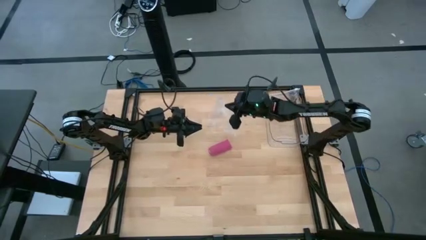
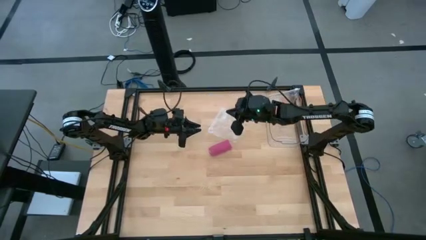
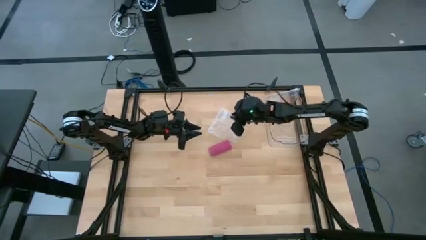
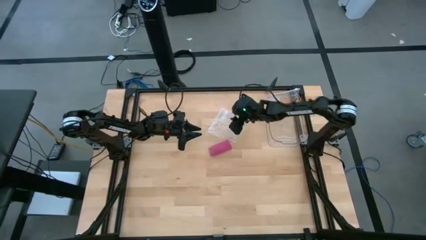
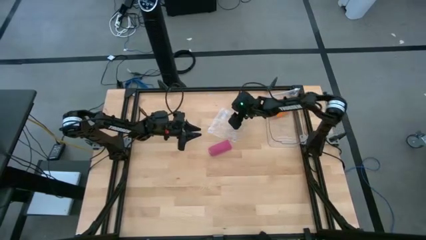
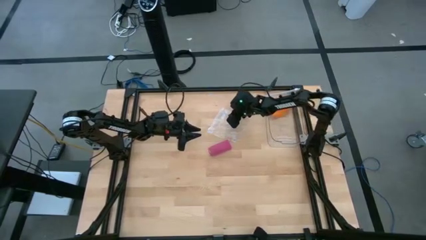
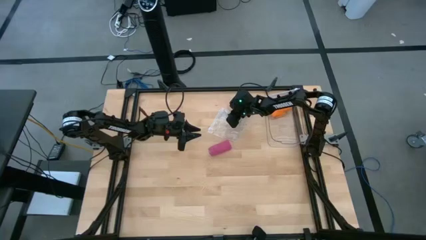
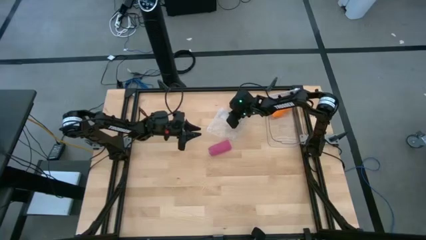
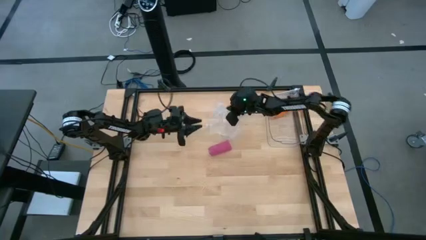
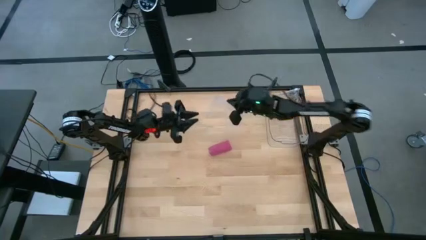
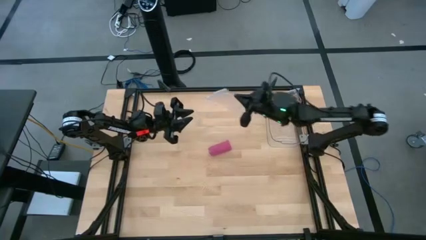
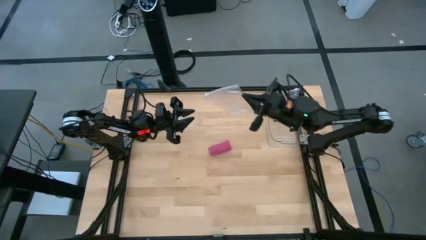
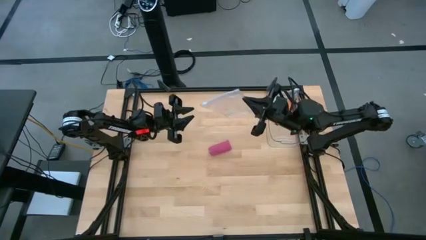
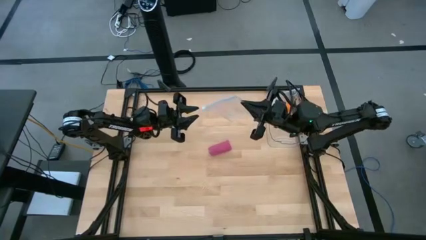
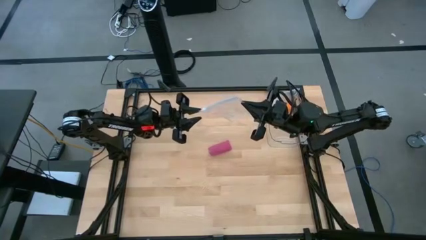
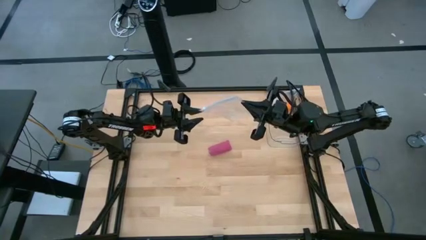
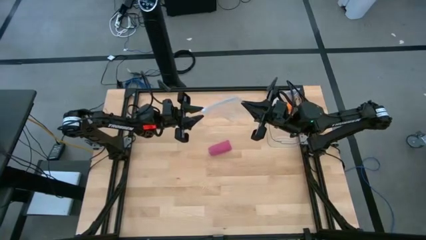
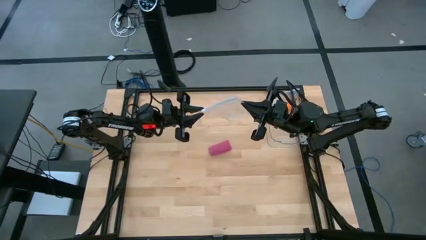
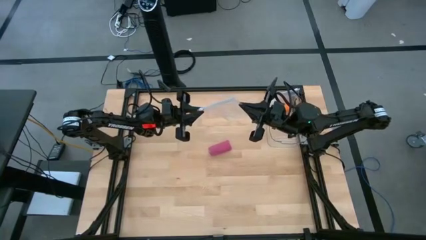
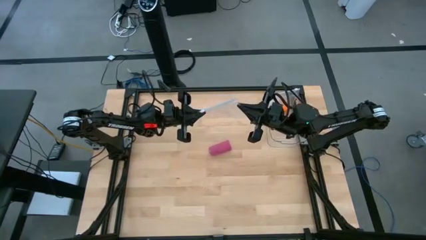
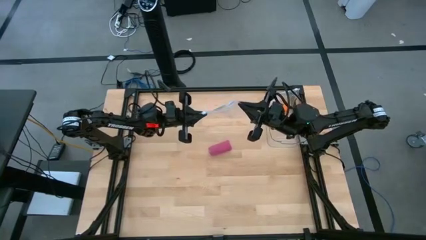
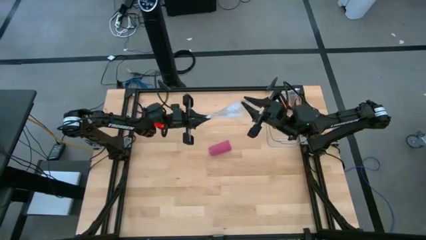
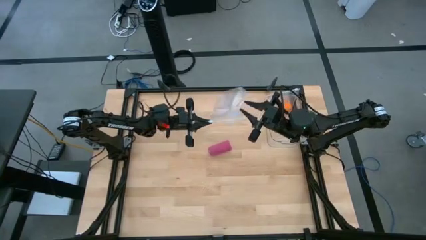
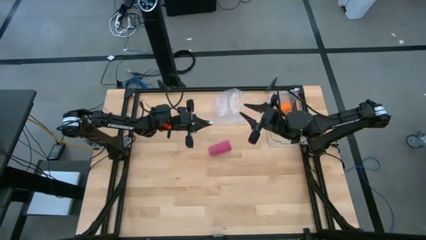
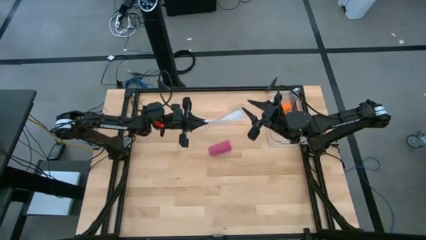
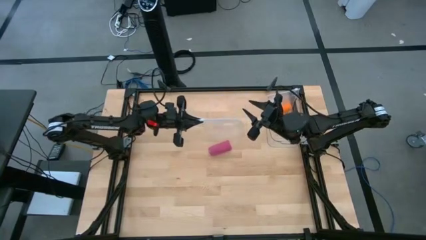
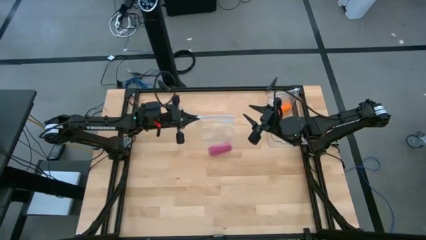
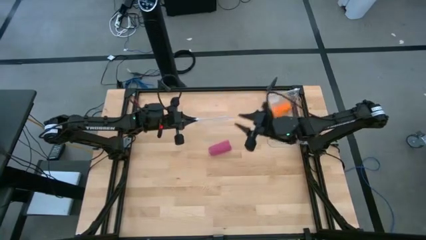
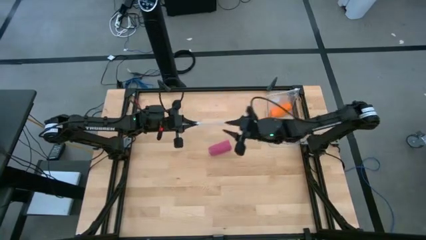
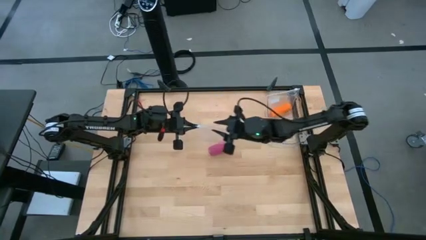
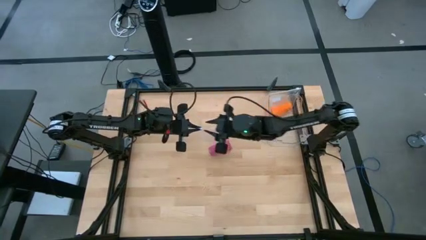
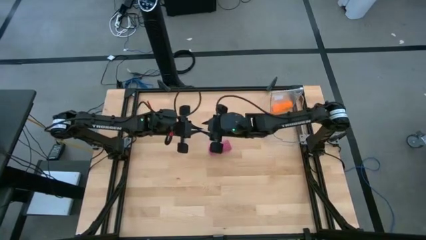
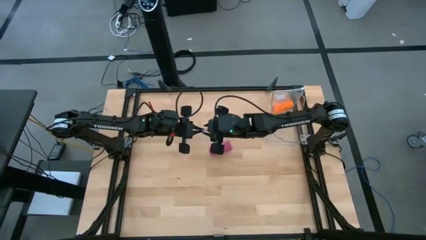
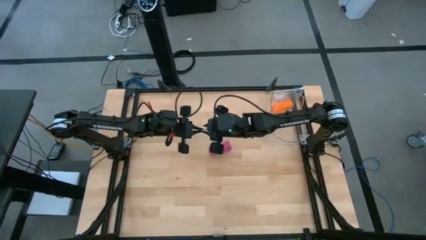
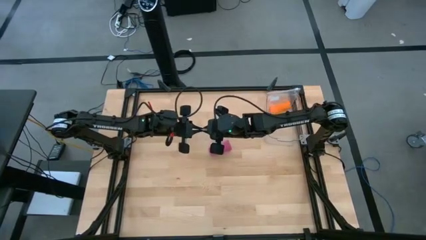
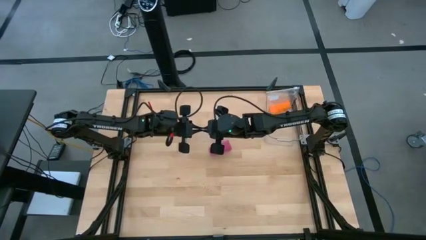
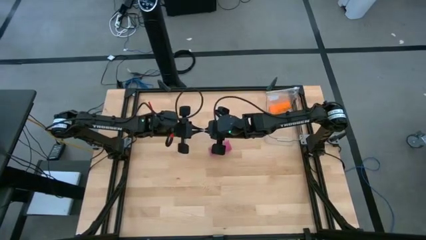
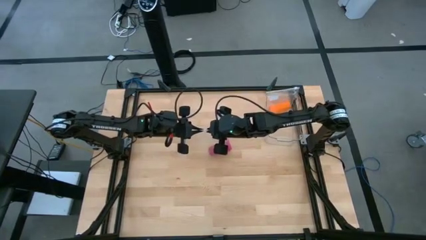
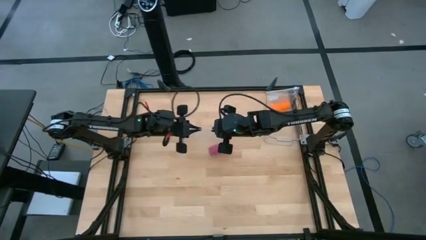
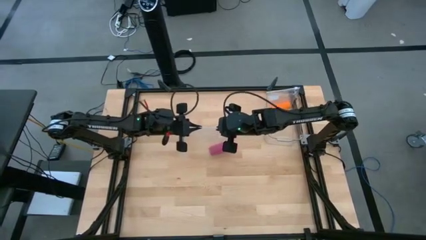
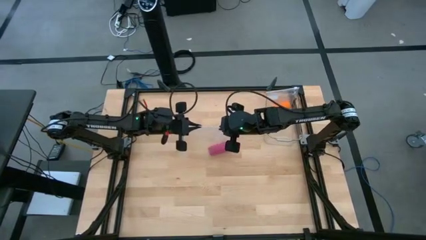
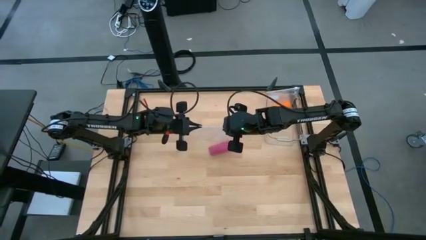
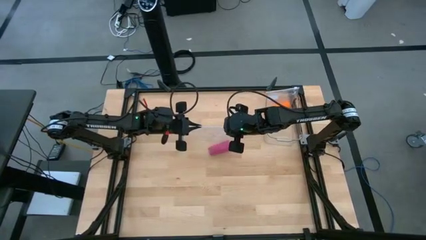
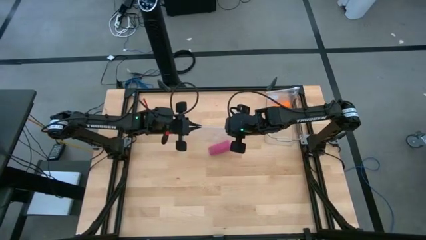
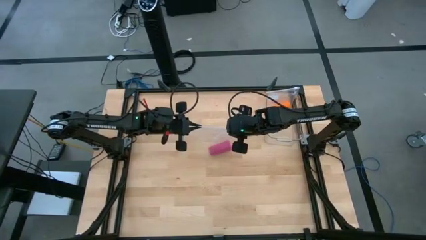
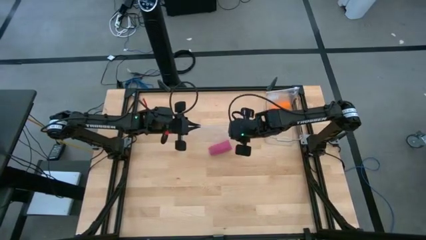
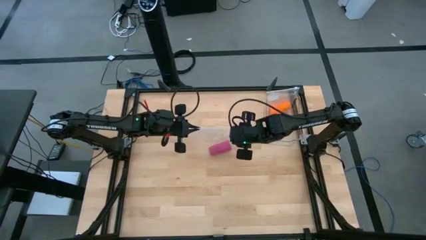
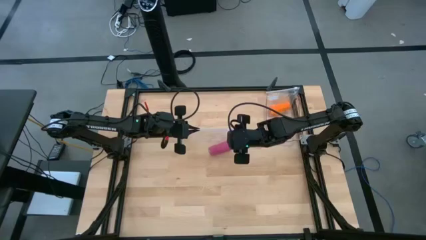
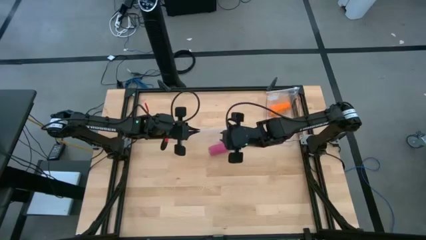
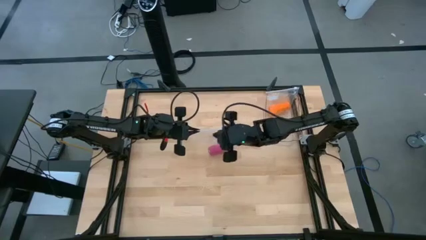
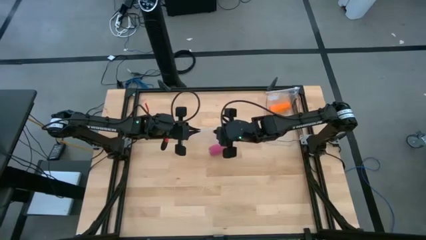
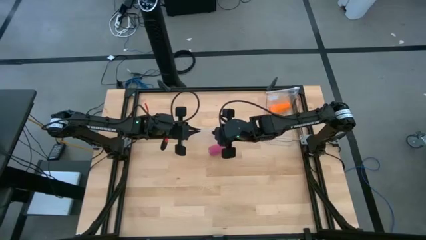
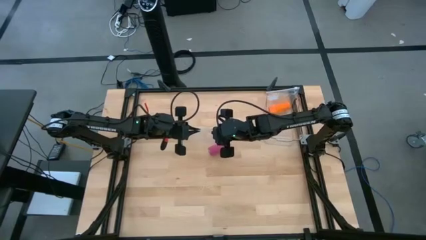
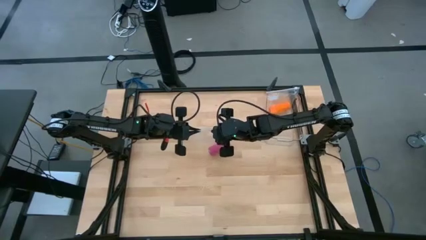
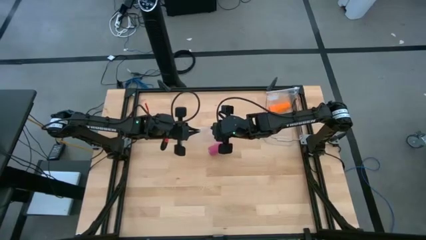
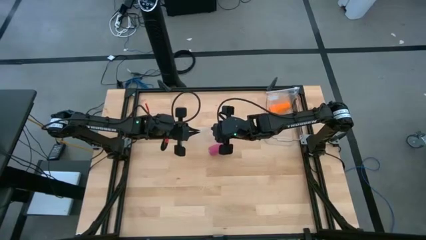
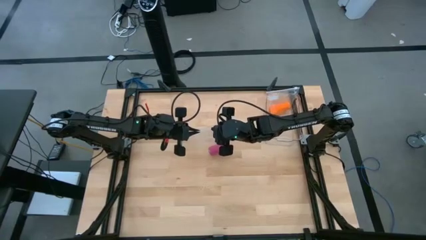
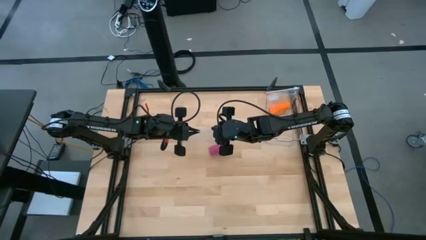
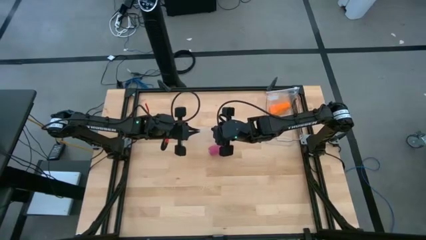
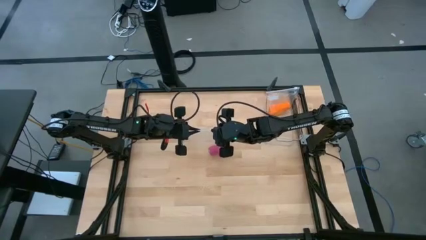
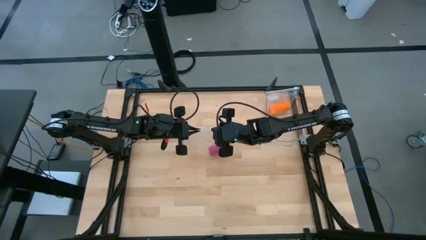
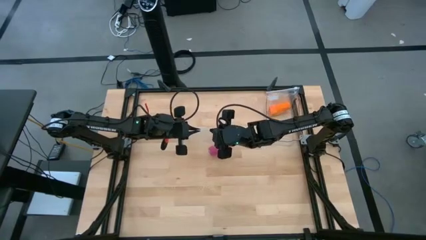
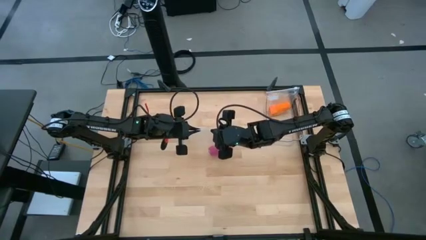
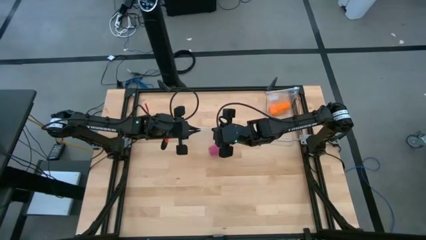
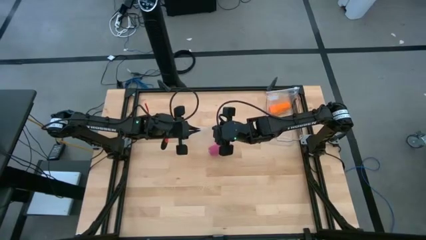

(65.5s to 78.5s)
Task: Roll bandage
Open the transparent zip bag

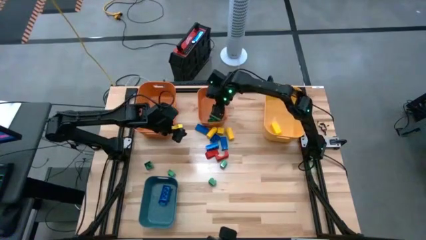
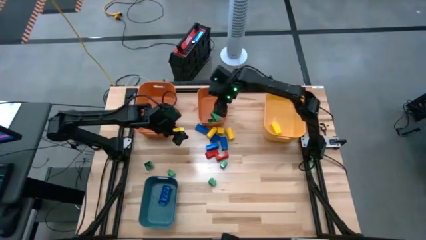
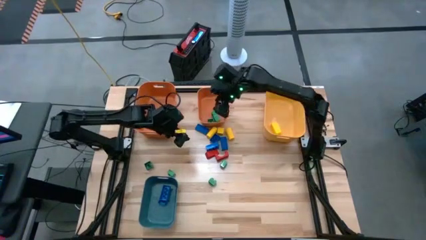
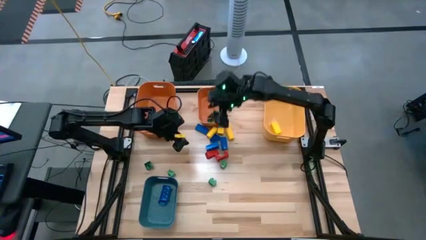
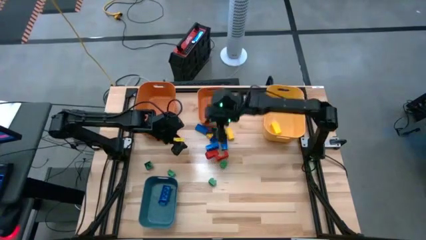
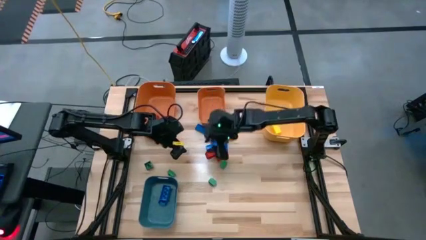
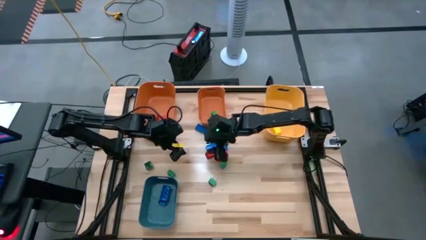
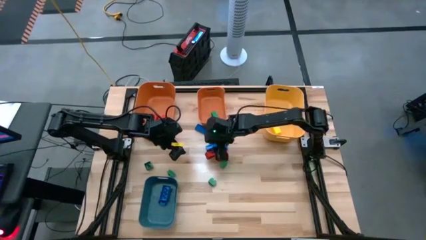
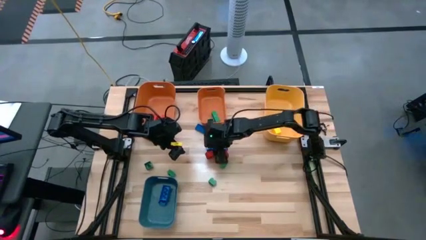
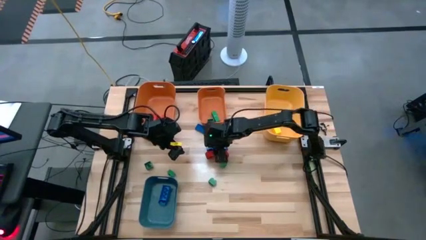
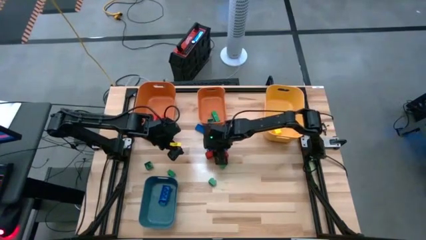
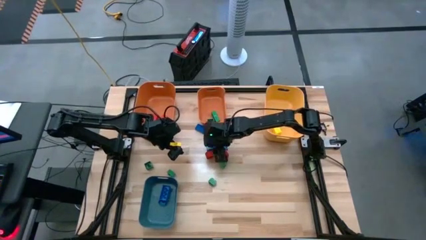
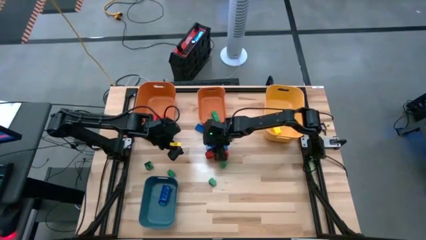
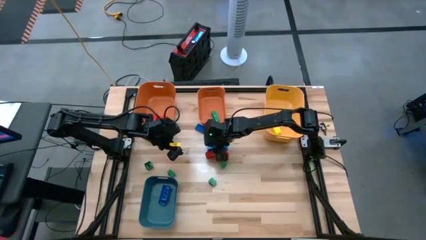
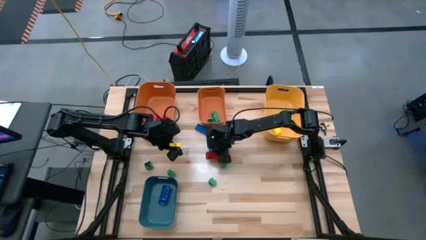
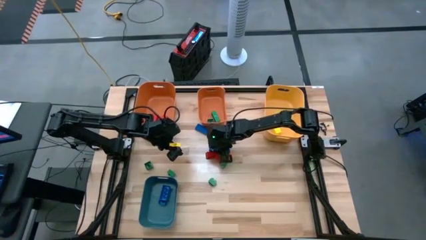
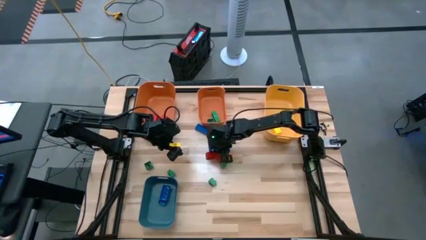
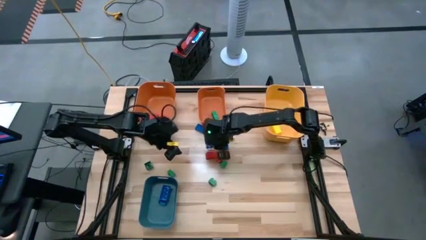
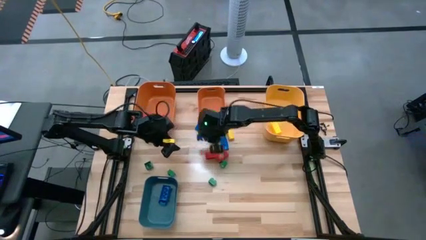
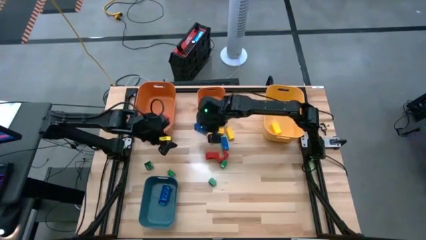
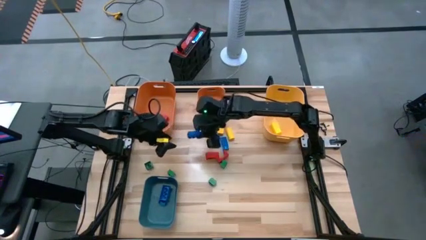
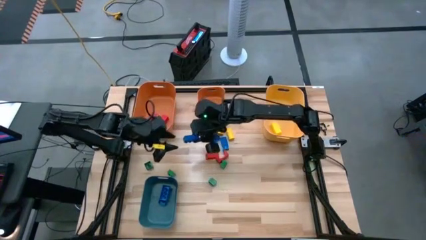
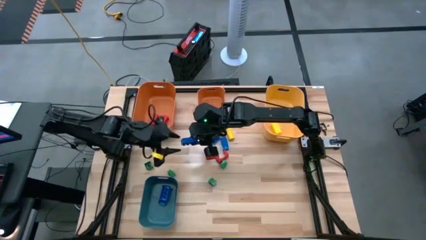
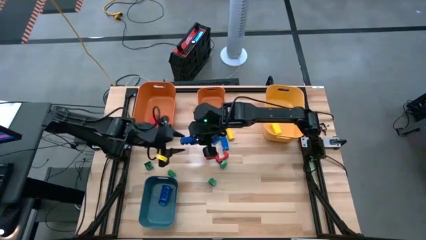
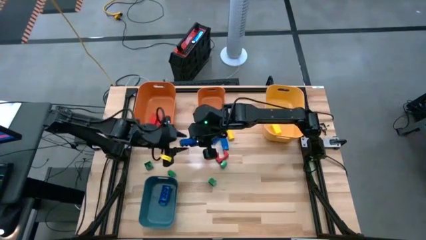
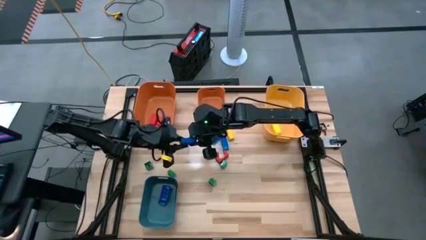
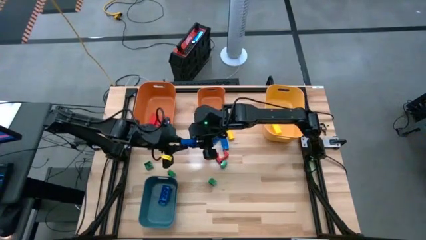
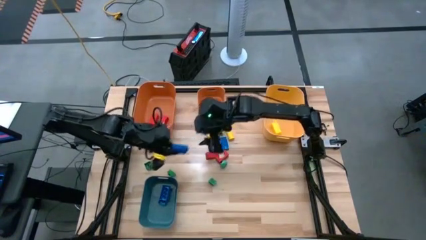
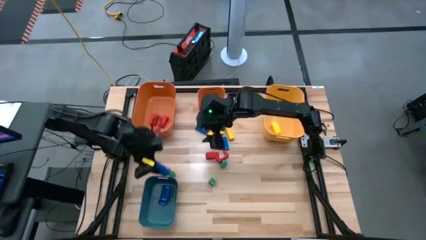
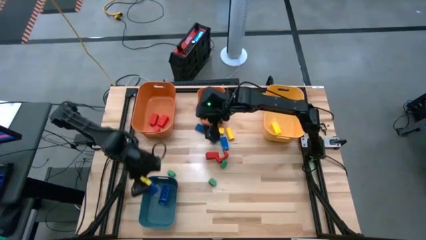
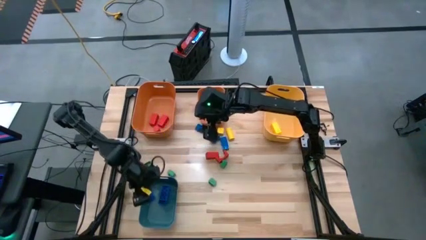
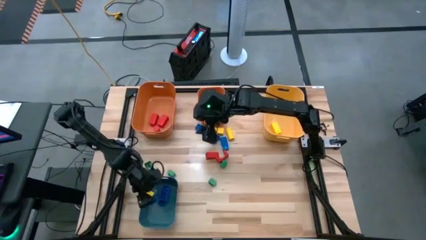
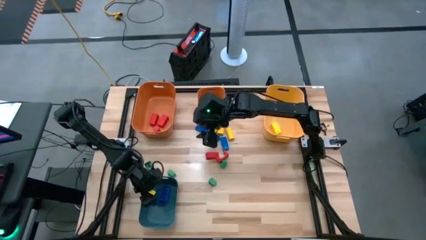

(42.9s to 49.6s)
Task: Sort blocks
Put the blue game piece into the blue bin
